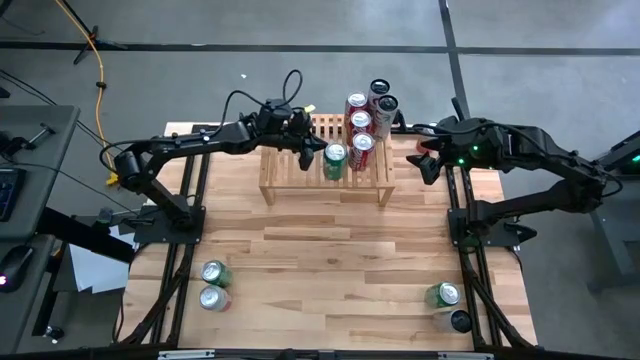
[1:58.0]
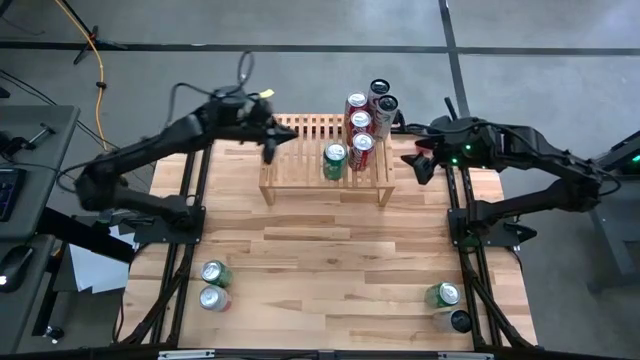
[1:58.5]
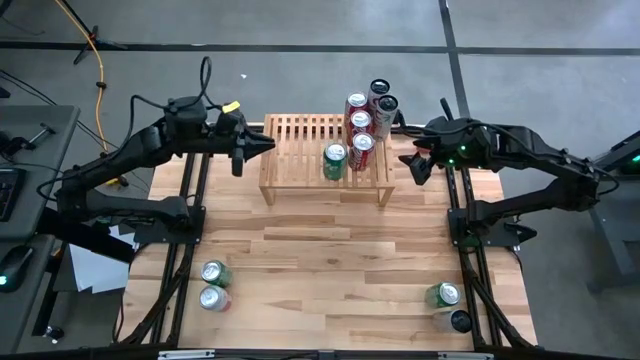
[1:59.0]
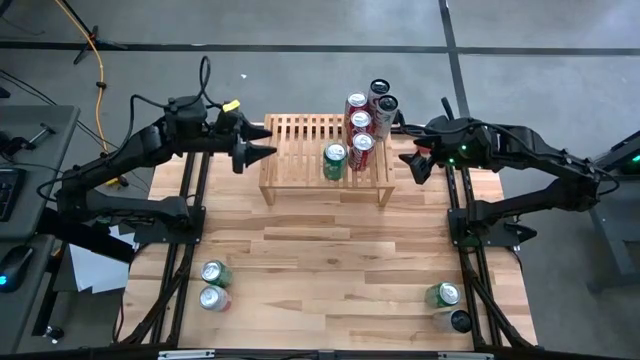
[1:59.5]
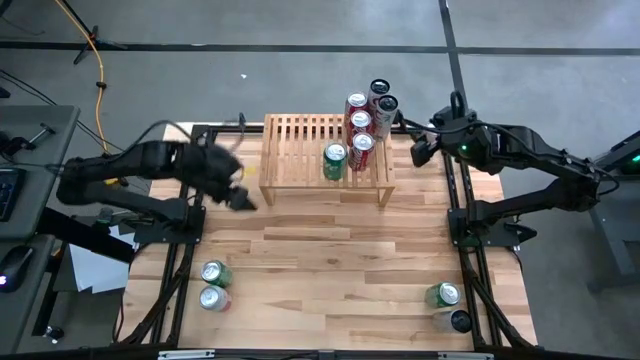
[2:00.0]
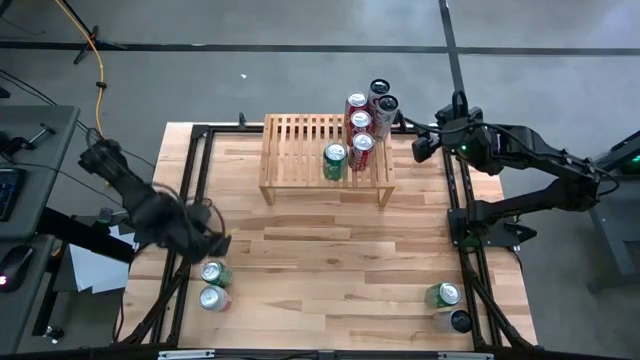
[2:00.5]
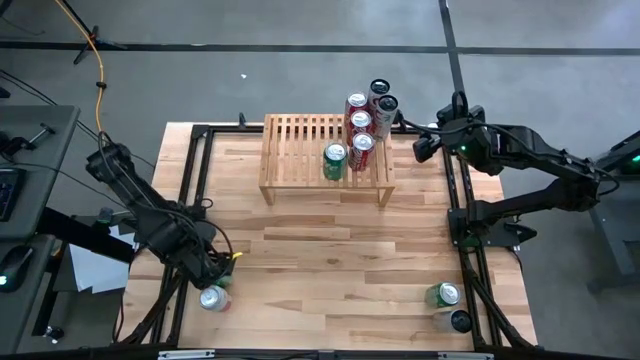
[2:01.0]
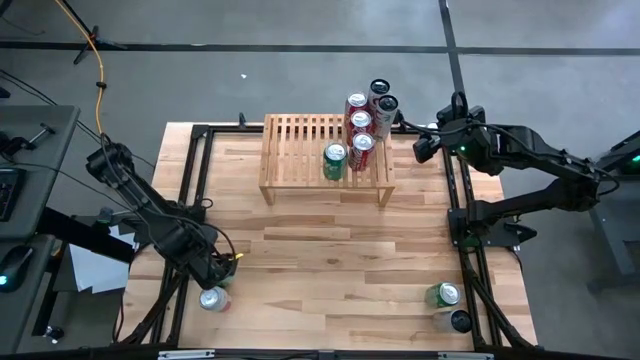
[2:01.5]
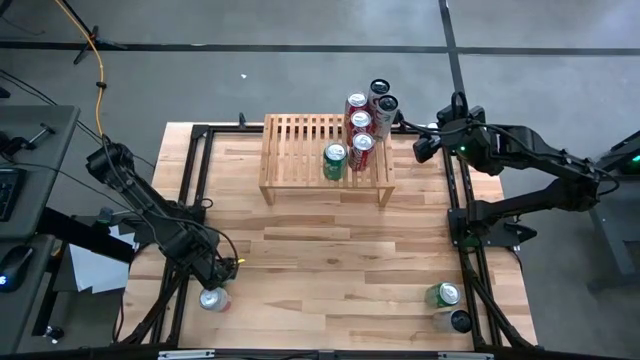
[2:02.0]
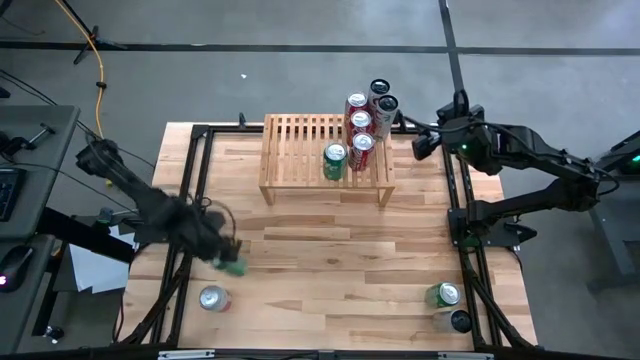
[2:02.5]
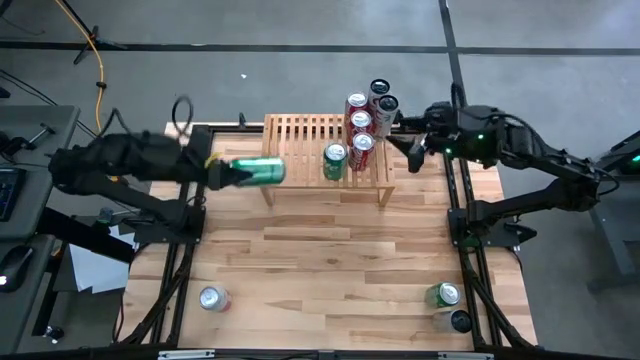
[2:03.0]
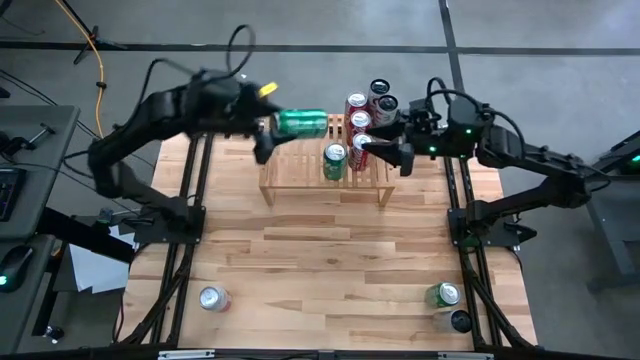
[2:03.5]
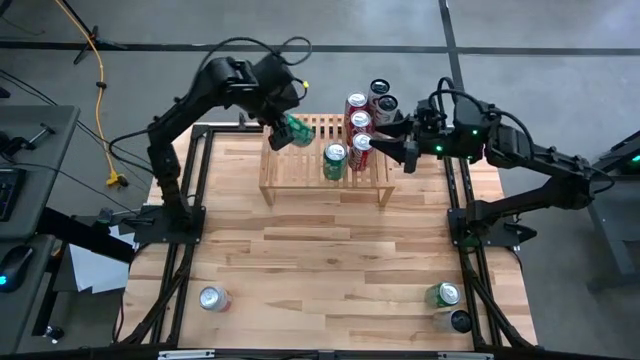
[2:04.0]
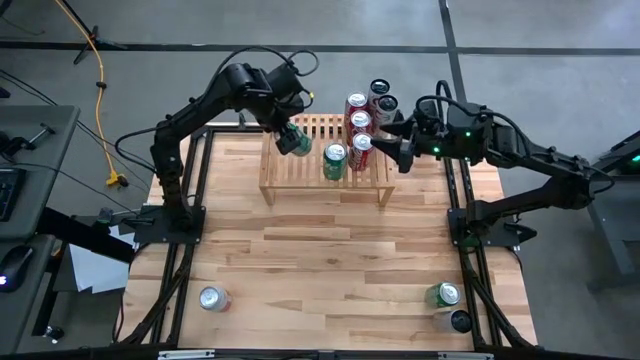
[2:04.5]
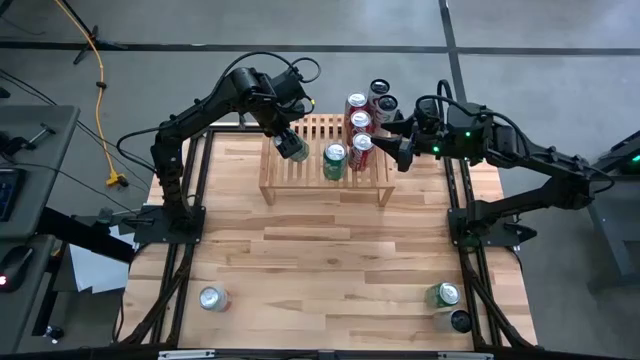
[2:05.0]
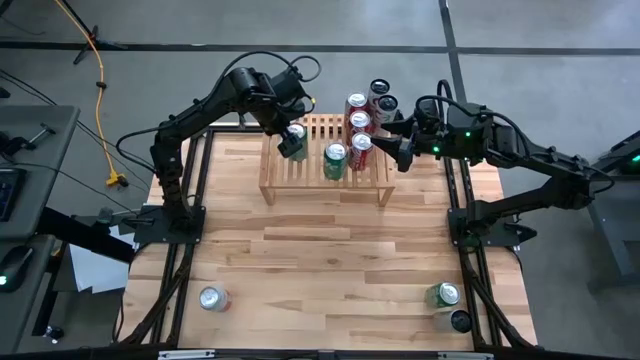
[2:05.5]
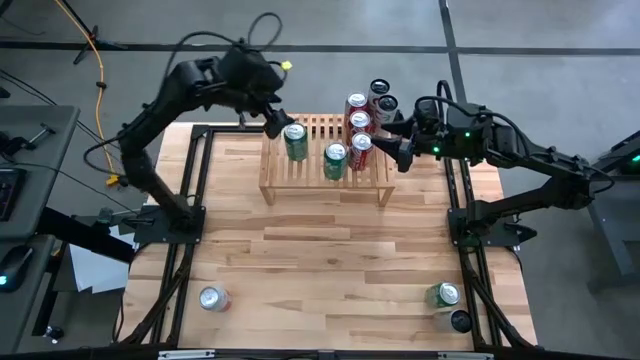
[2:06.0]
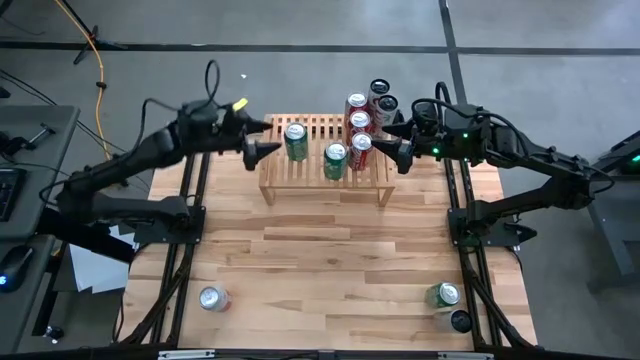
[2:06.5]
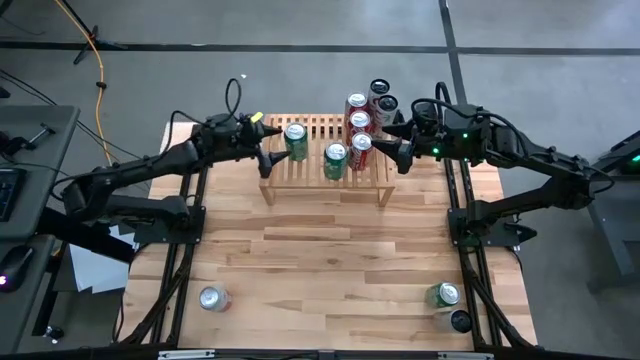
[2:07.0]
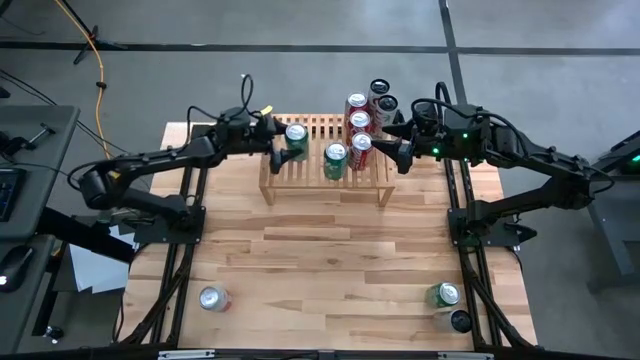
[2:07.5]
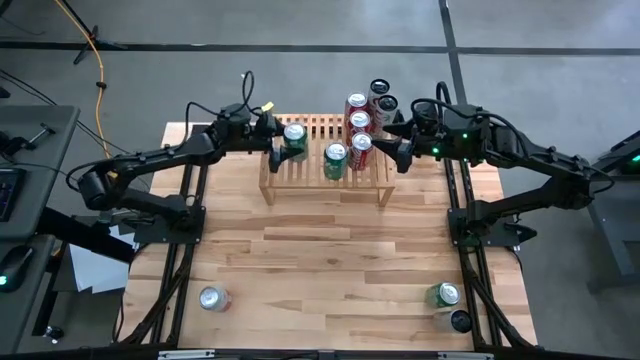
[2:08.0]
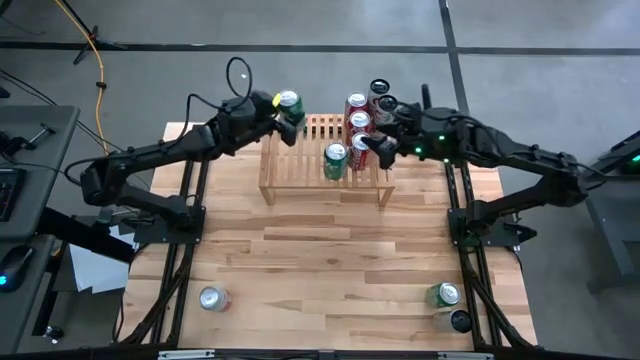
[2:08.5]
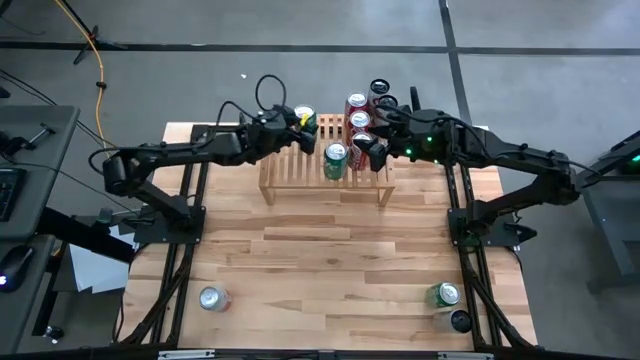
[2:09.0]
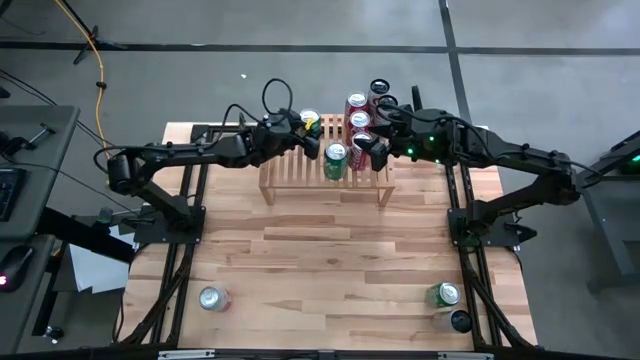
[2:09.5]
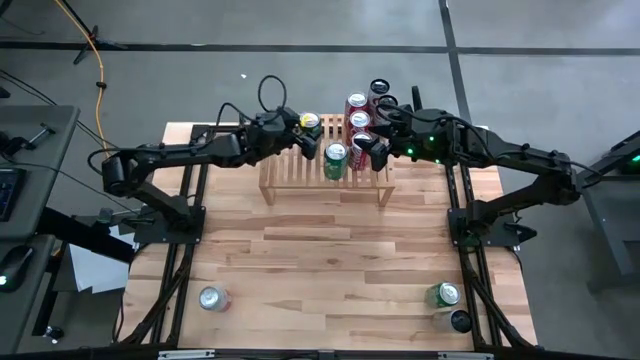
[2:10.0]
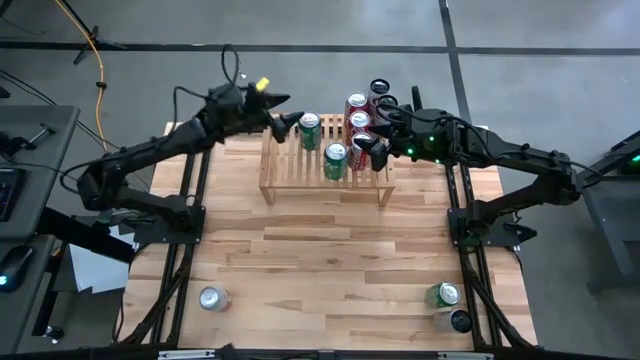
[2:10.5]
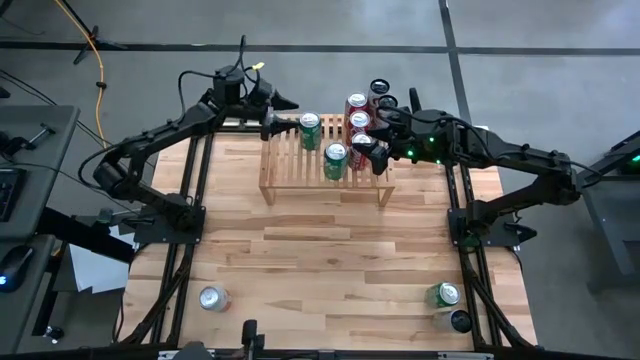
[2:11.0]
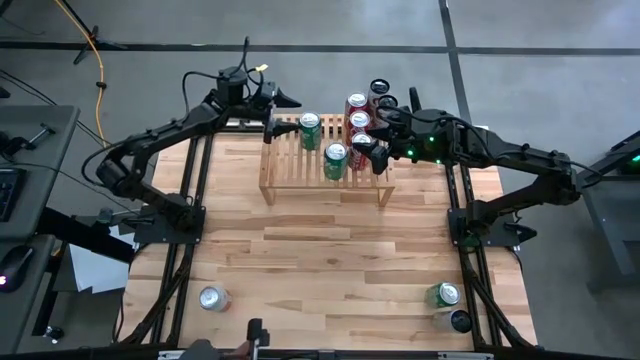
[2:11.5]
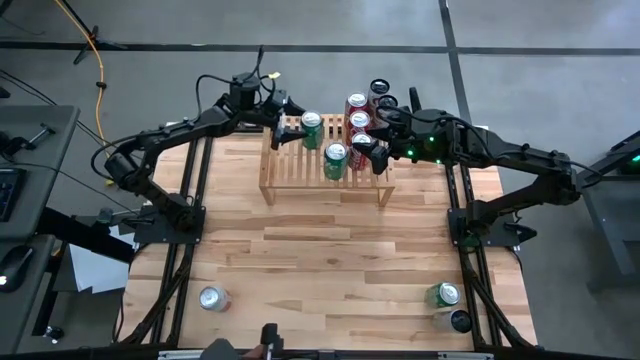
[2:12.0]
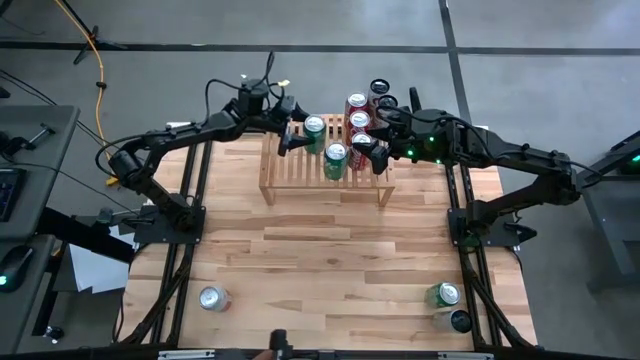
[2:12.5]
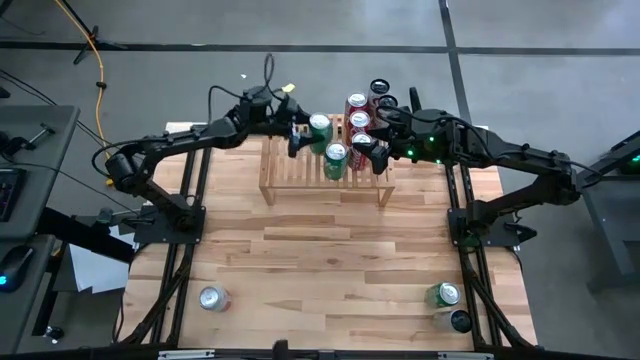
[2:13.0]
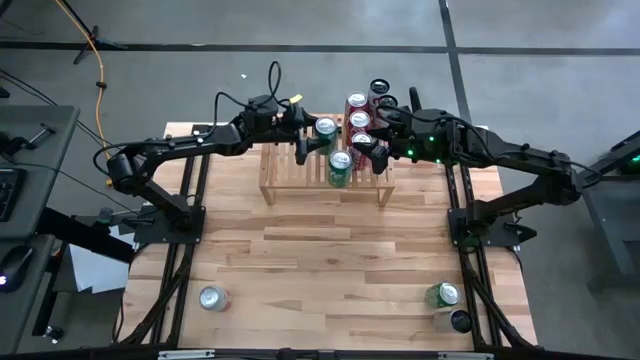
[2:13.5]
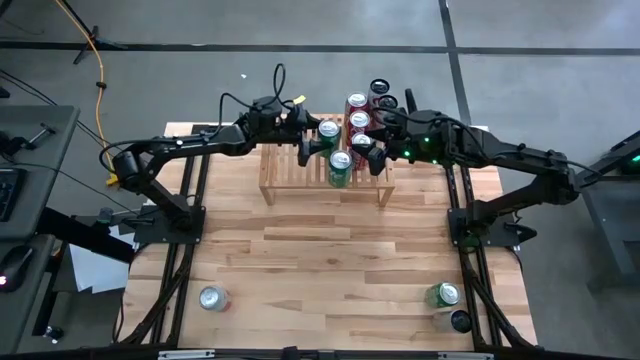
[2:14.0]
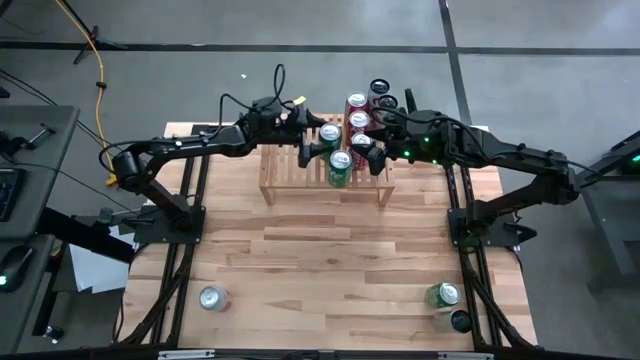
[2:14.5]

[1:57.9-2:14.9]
Task: Place canned beverage on shelf
Put the left green soda can on the shelf aligned with the other green soda can

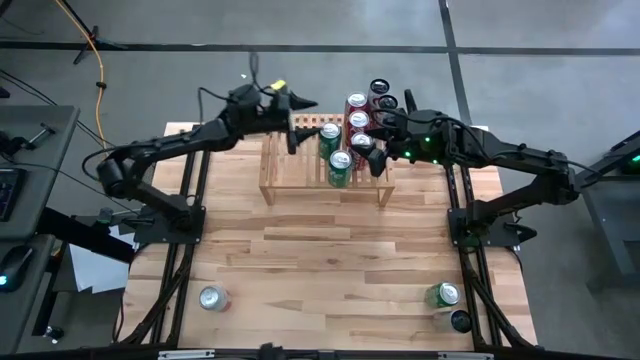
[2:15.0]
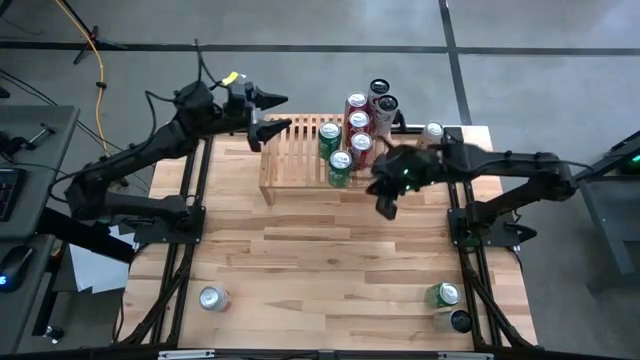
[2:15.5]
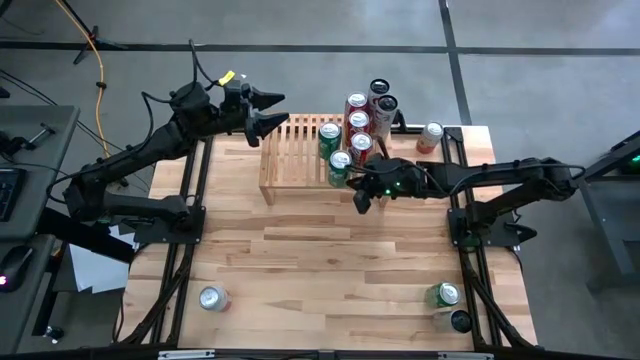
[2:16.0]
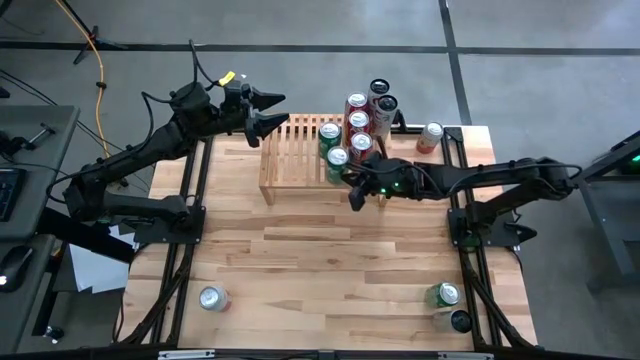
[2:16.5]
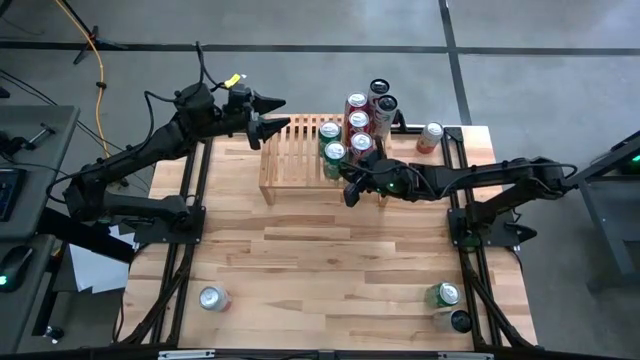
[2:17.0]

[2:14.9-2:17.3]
Adjust the green soda can on the shelf

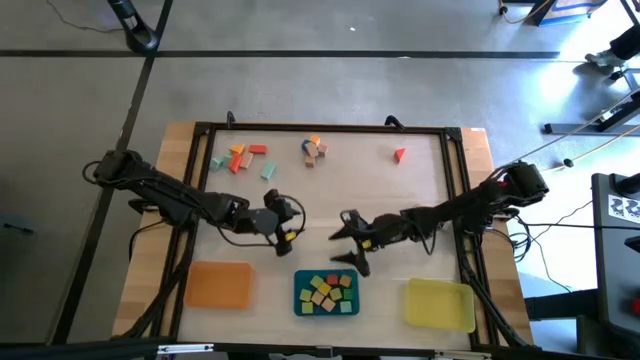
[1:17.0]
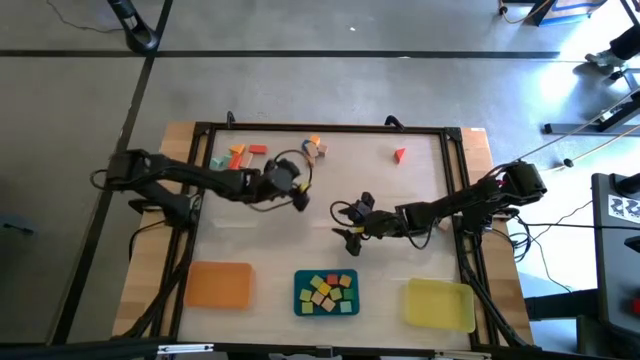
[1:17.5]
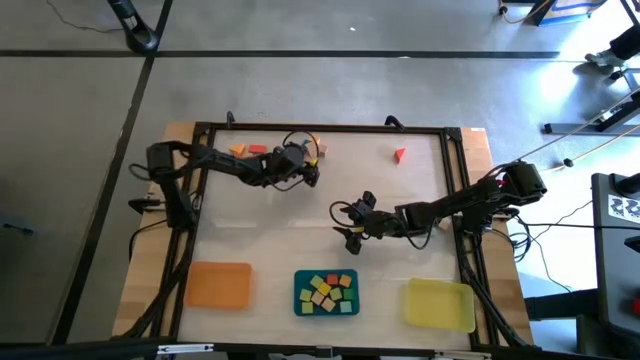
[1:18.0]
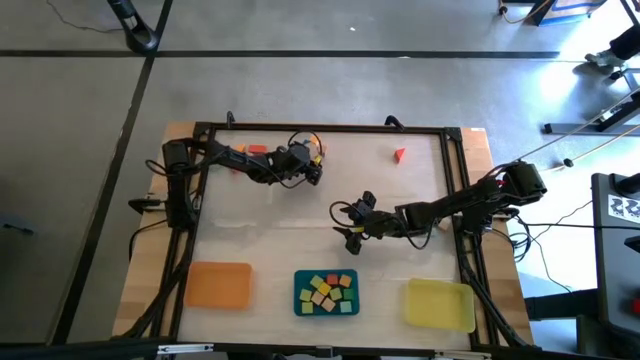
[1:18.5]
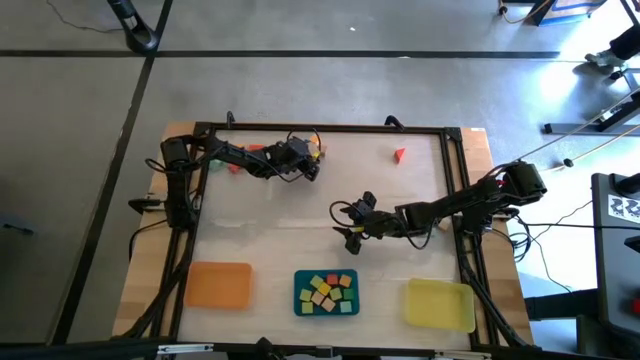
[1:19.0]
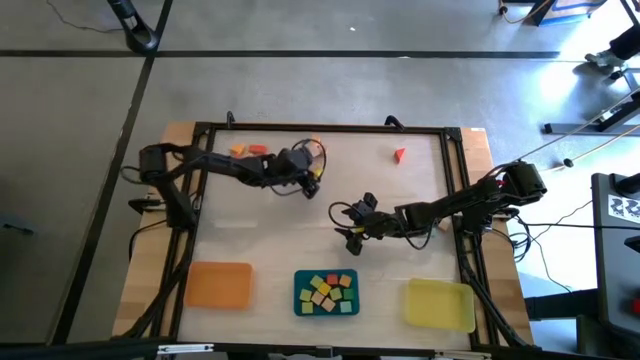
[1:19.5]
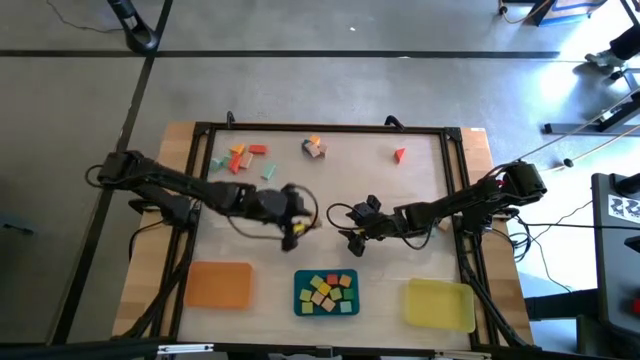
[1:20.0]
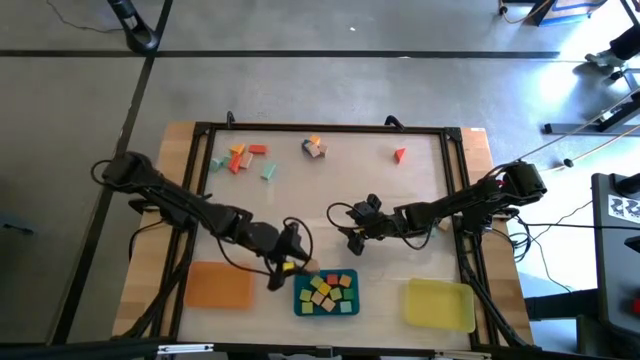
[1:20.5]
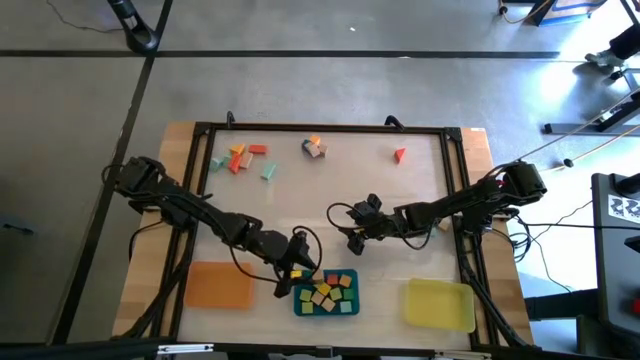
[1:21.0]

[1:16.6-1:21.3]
Task: Sort blocks by size
Put the brown cube block into the blue bin
